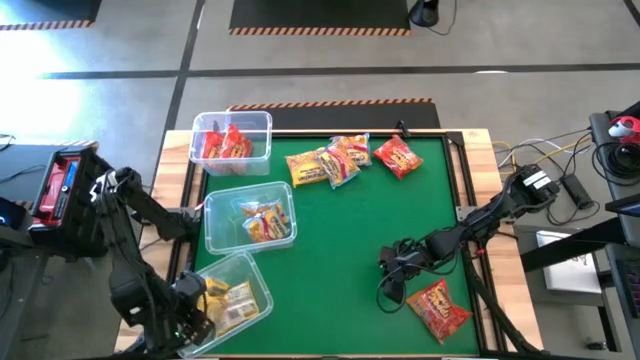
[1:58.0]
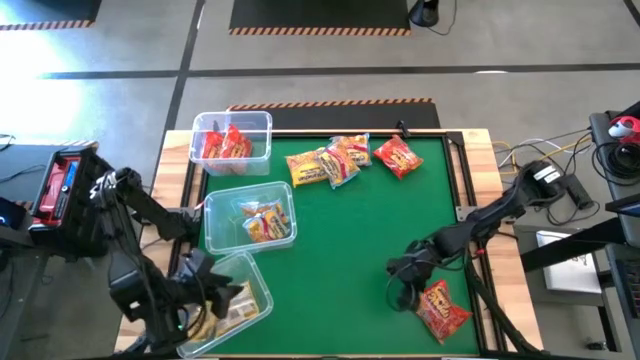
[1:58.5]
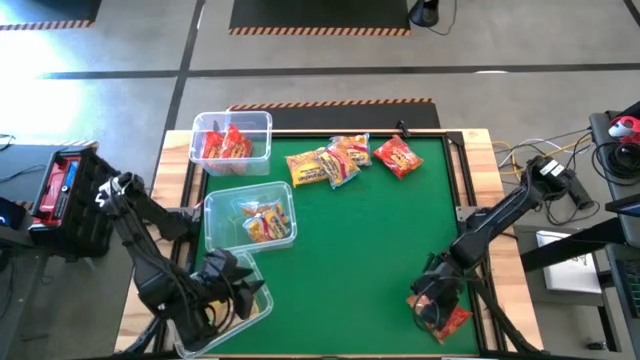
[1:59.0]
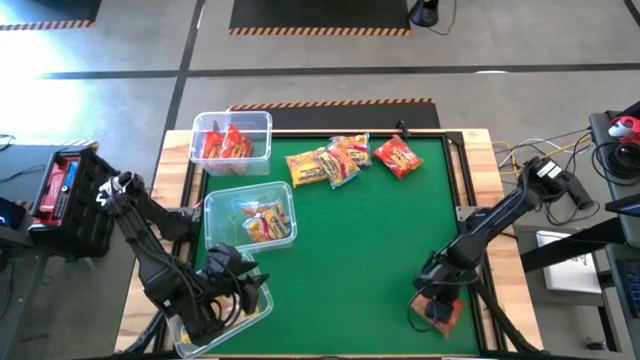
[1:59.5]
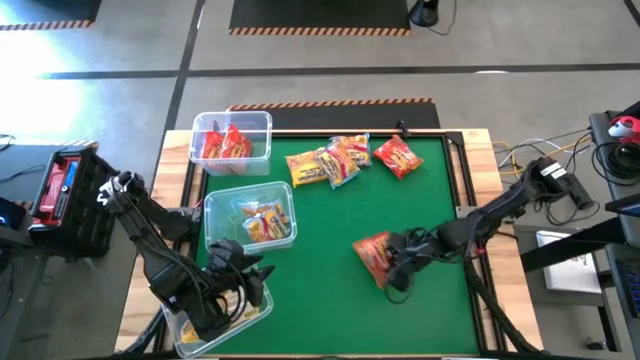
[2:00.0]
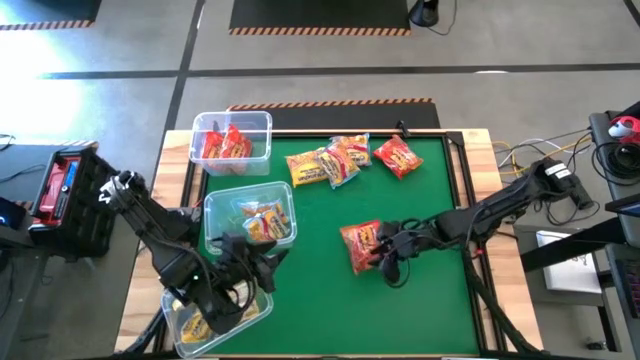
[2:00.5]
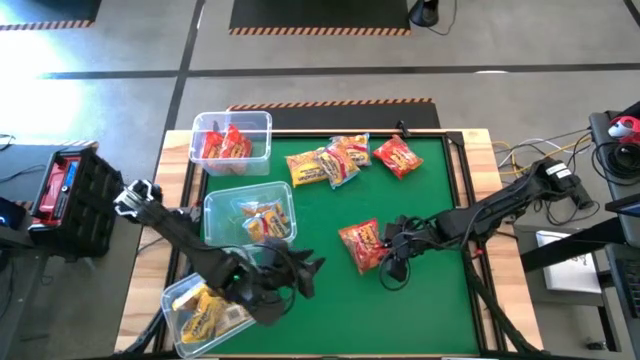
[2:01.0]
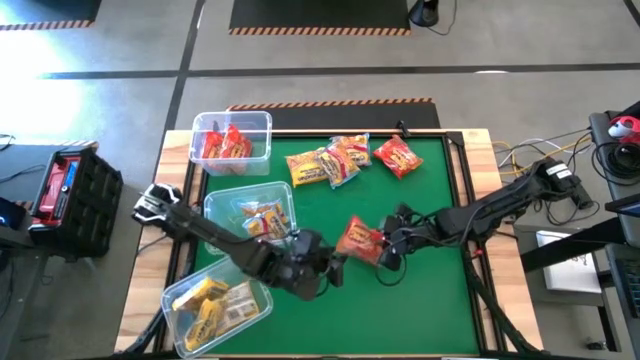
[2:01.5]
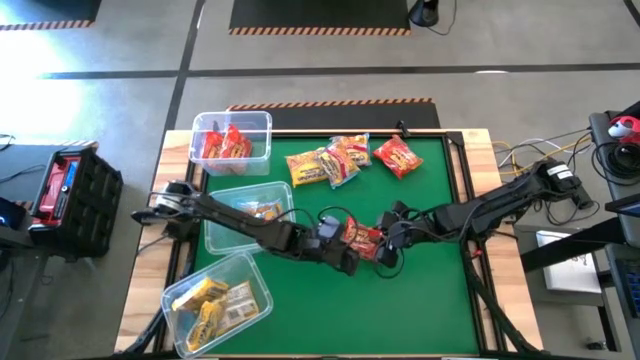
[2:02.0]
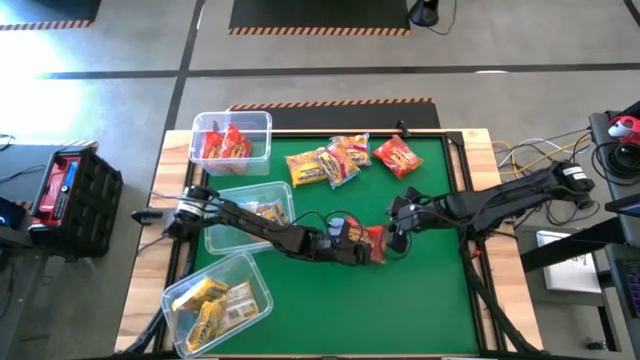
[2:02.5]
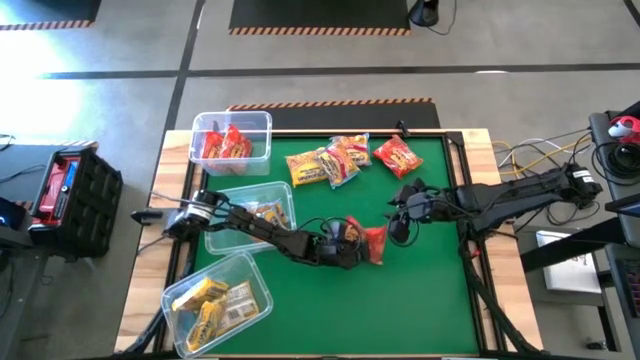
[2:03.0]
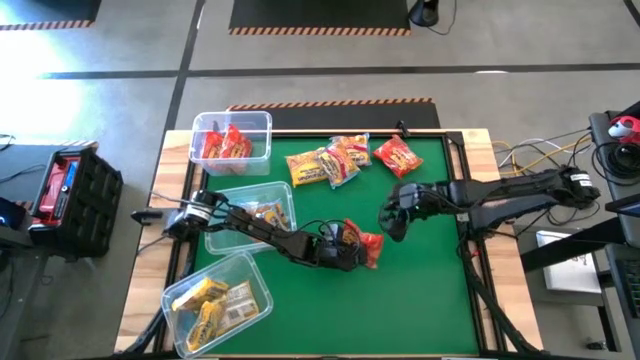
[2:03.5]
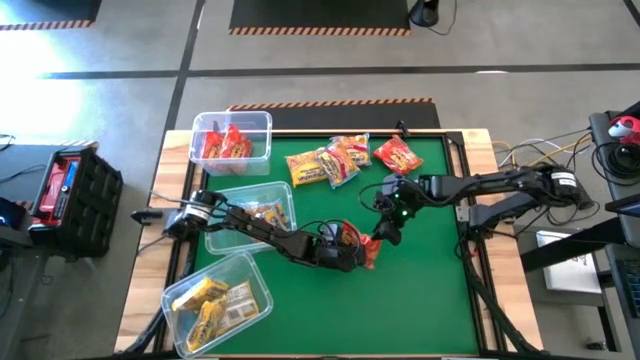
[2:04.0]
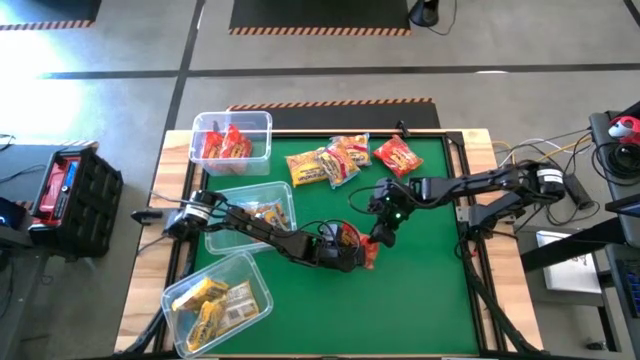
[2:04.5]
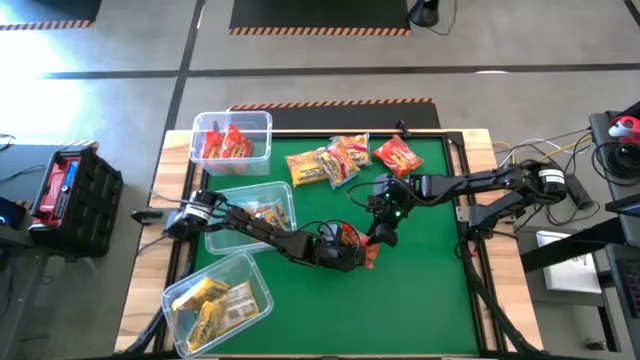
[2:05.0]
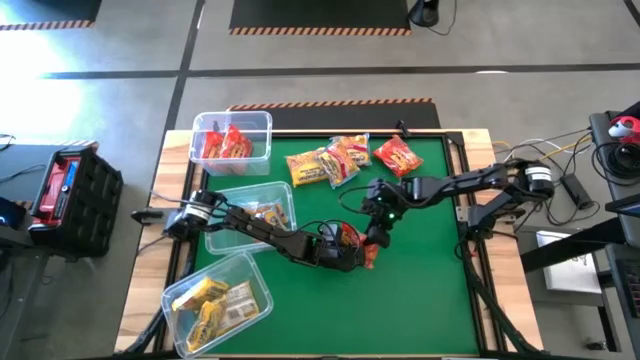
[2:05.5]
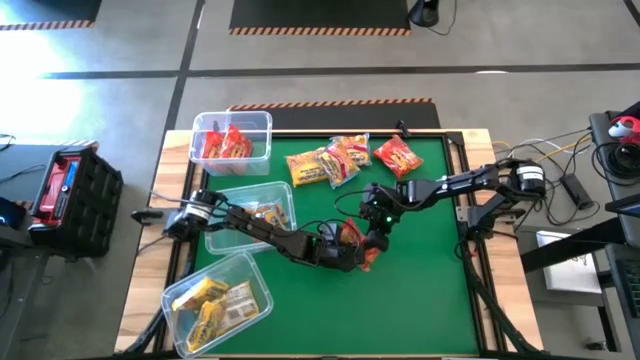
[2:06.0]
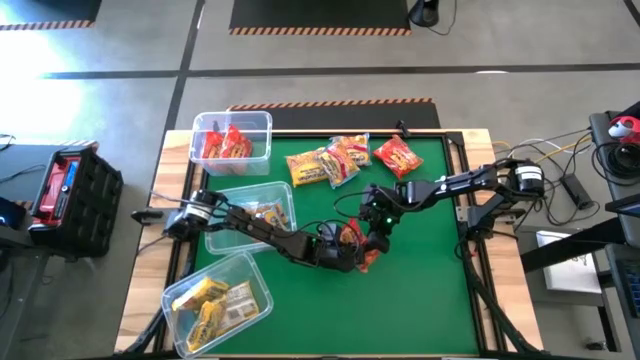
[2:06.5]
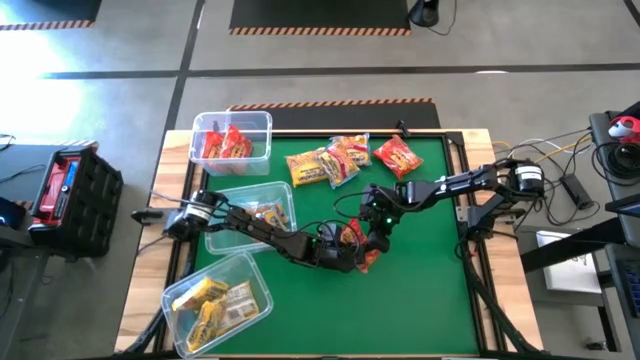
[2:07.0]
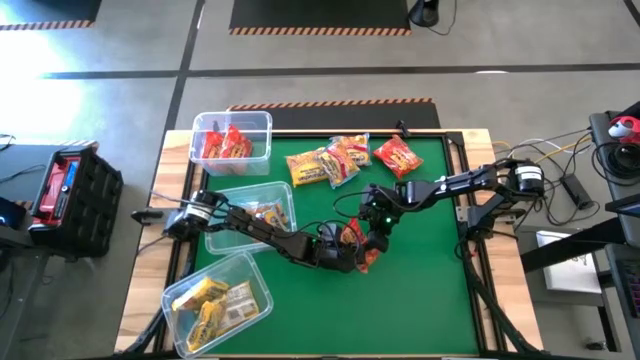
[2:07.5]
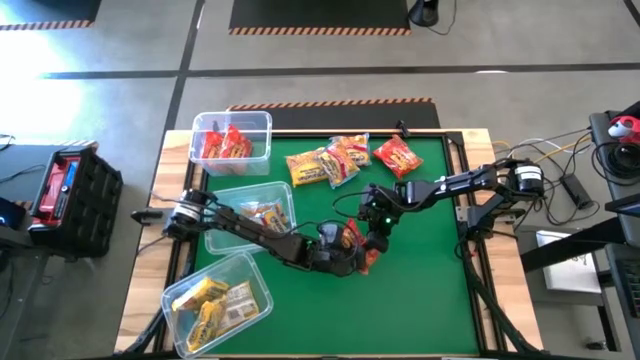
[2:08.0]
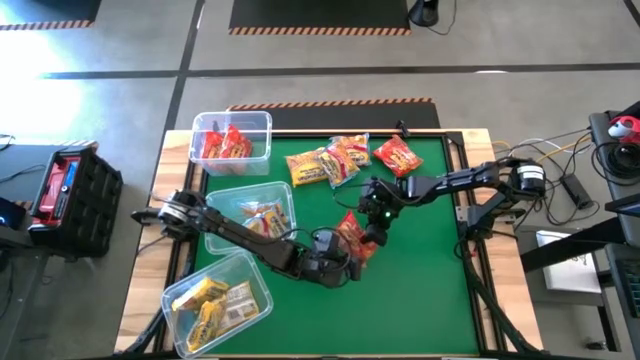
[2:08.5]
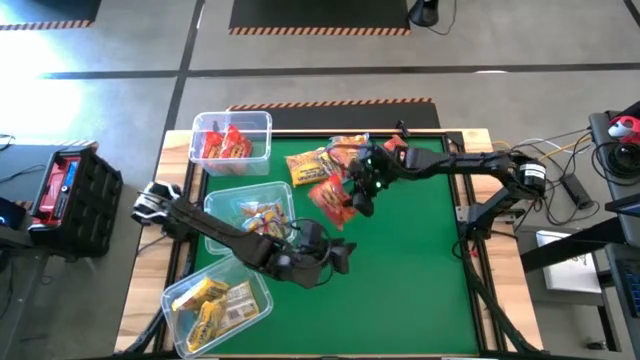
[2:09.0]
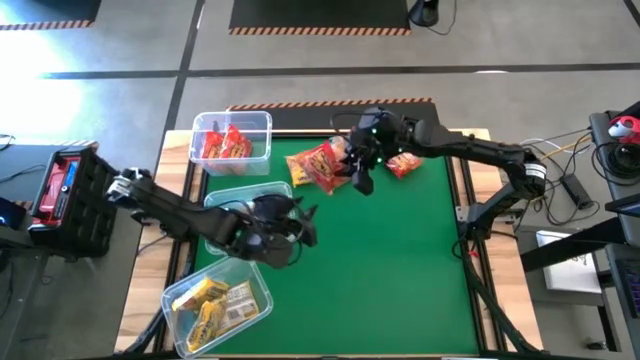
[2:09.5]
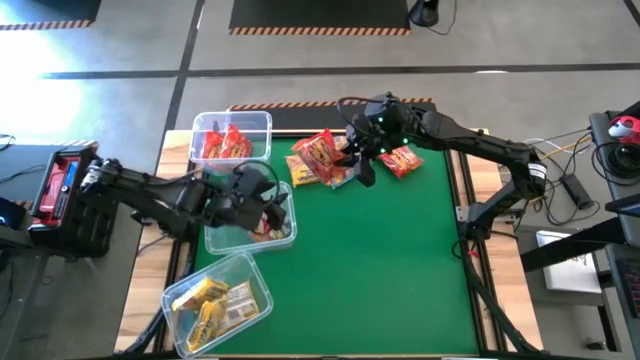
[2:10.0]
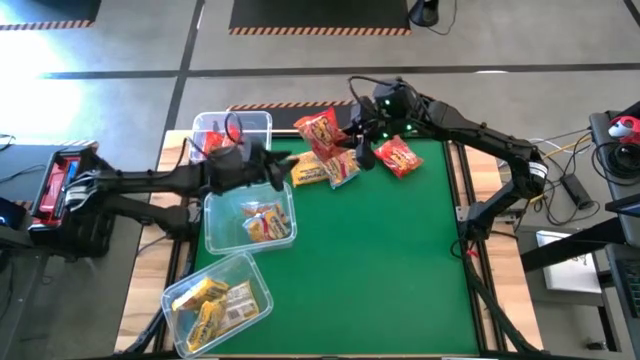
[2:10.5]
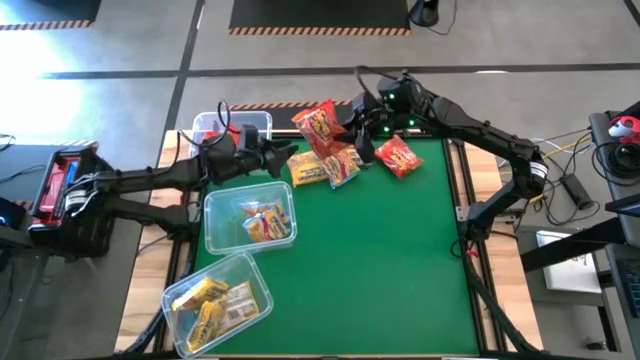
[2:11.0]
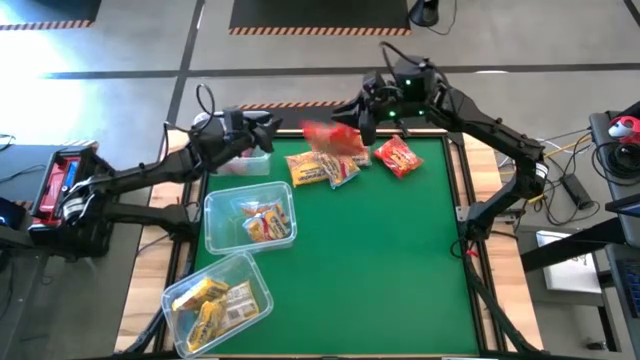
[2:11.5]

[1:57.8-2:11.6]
Task: Sort Maruchan noodles
Put the bottom orange noodle pack into the top transparent bin

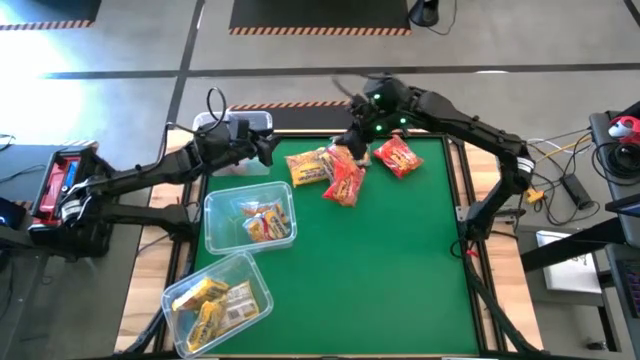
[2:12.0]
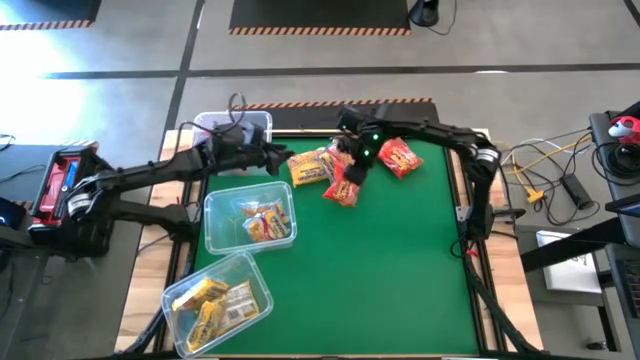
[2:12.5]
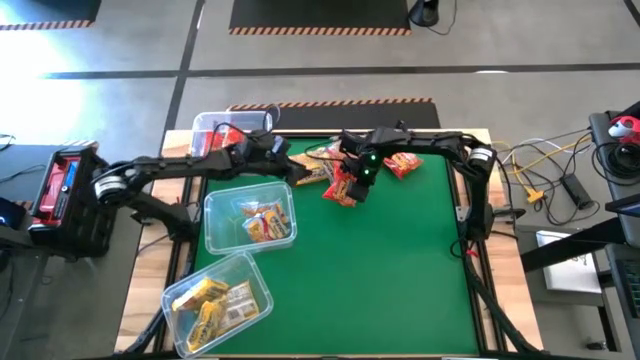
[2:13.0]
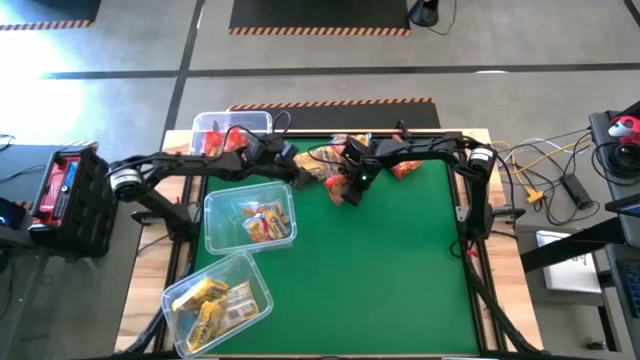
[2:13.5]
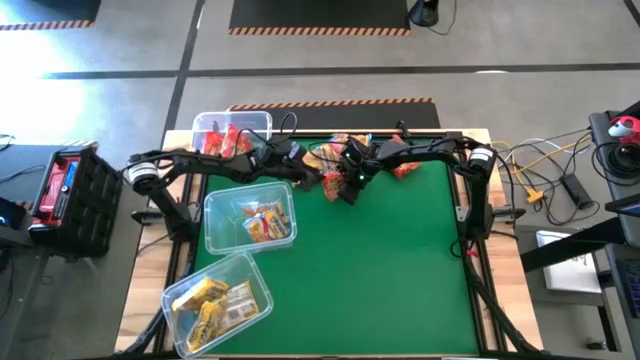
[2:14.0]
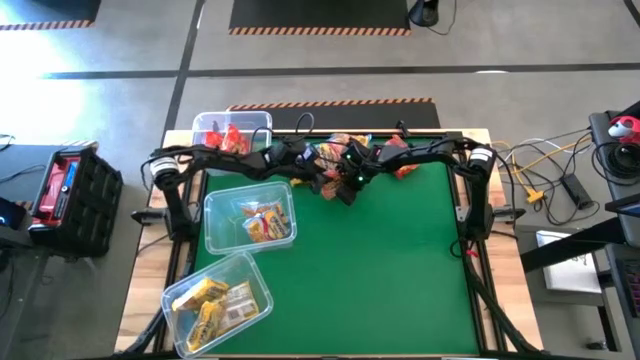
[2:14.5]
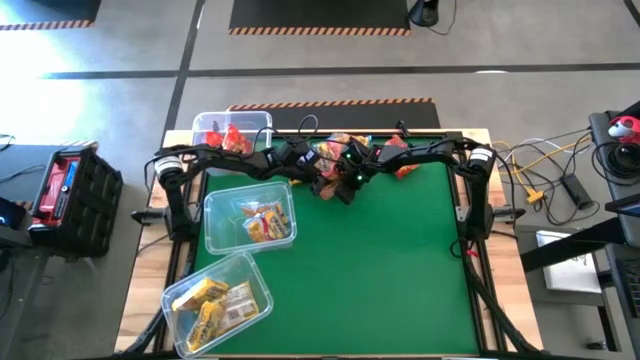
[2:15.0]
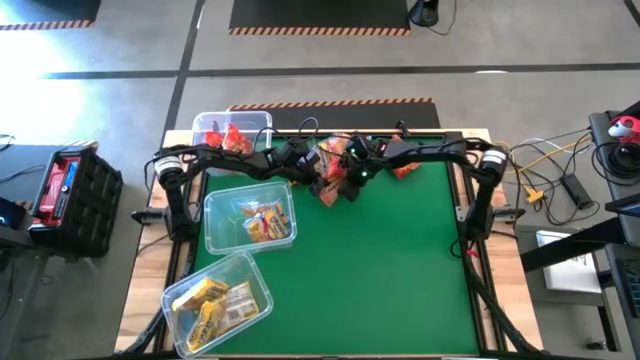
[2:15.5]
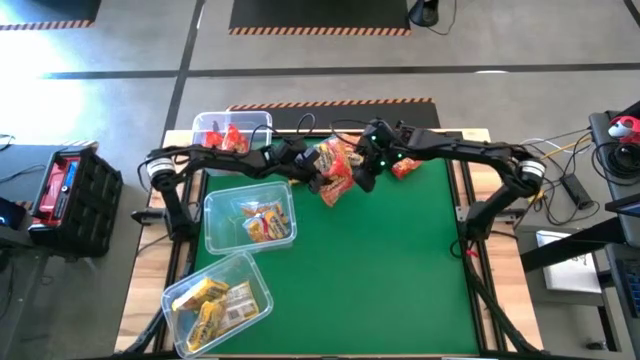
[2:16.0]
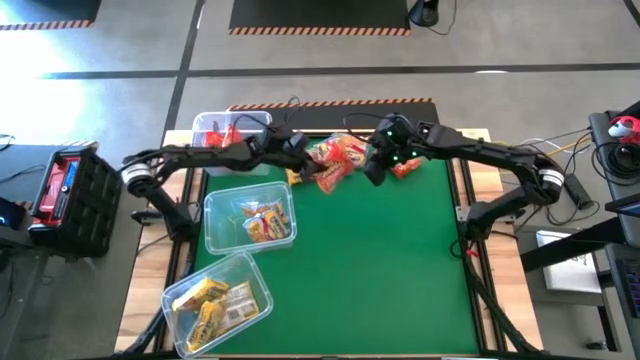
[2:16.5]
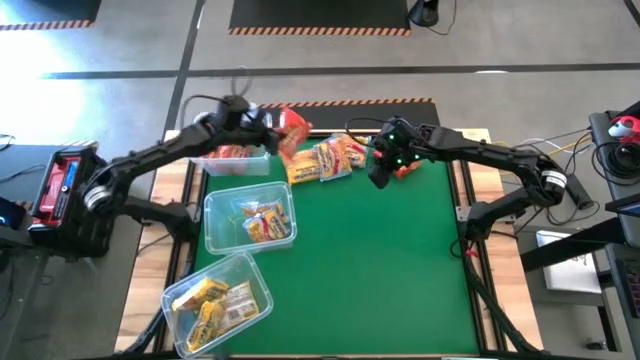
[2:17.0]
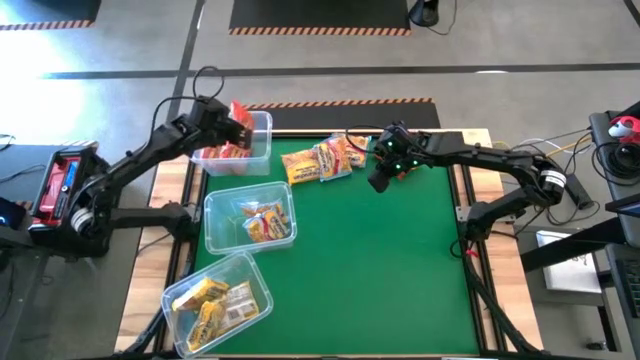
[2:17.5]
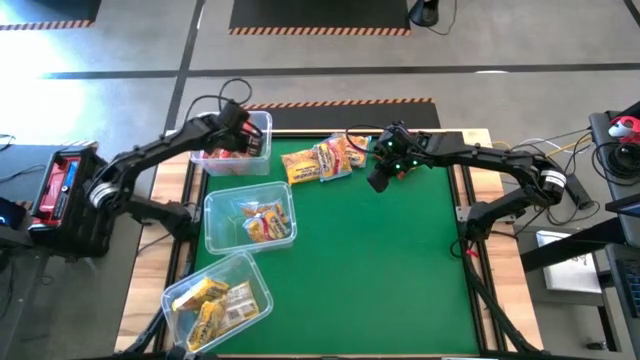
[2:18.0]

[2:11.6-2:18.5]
Put the bottom orange noodle pack into the top transparent bin

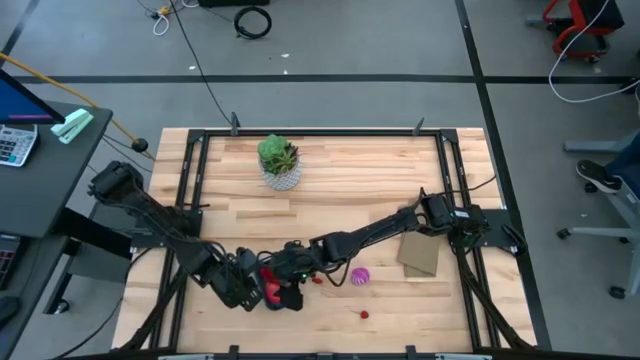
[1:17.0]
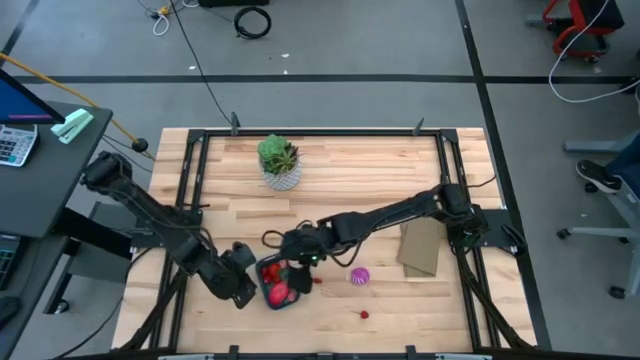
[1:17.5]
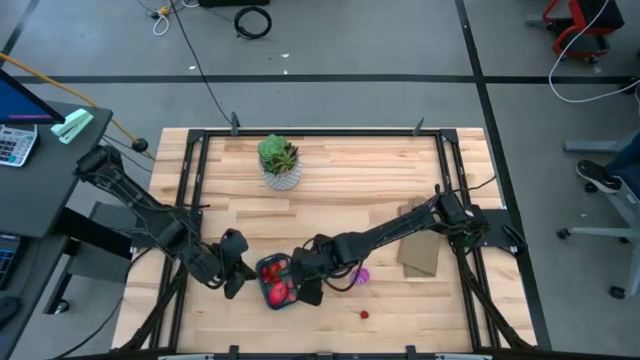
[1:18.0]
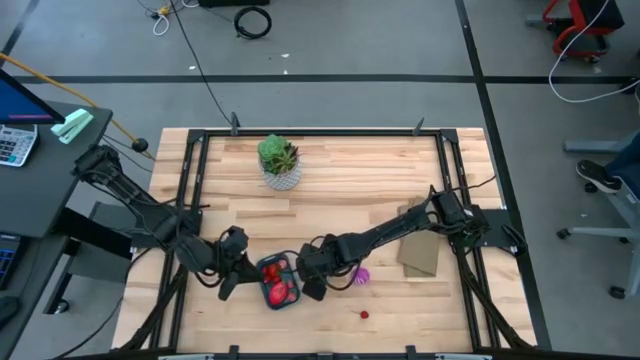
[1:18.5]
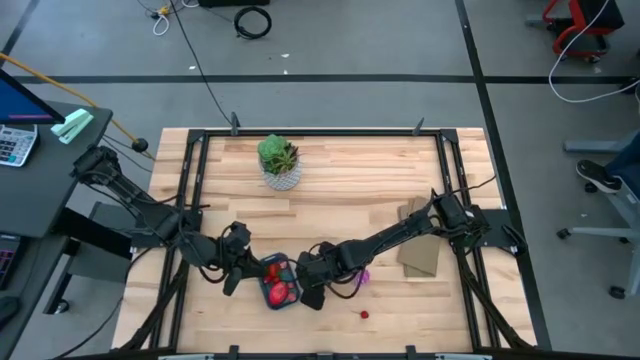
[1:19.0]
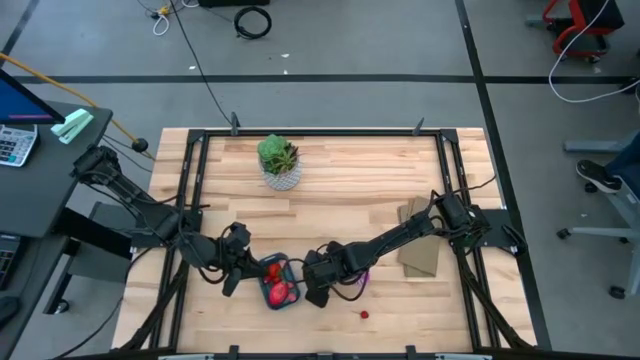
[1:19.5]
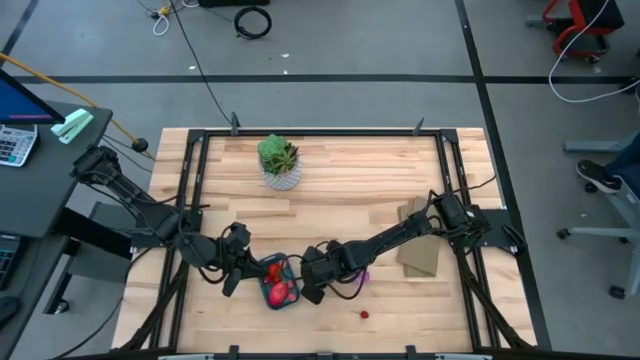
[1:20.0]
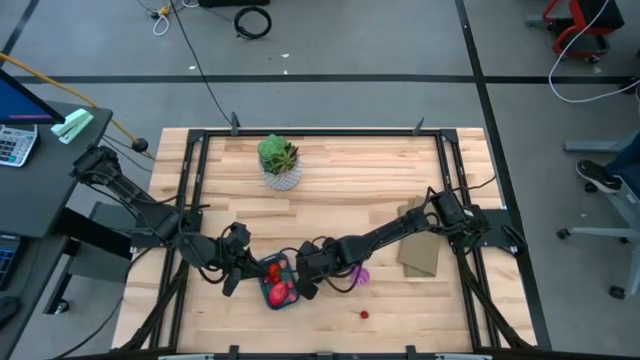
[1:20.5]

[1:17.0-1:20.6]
Task: Pick and placing Produce into tupperware
Put the left red cherry into the bin
